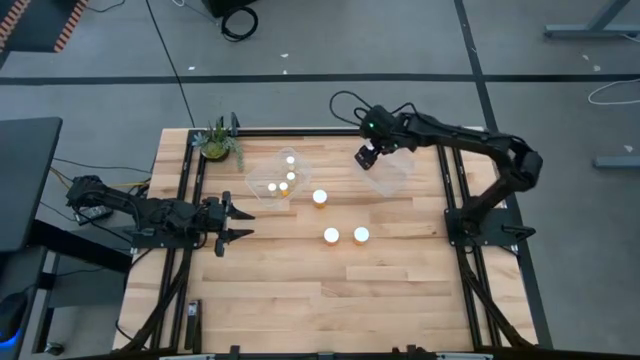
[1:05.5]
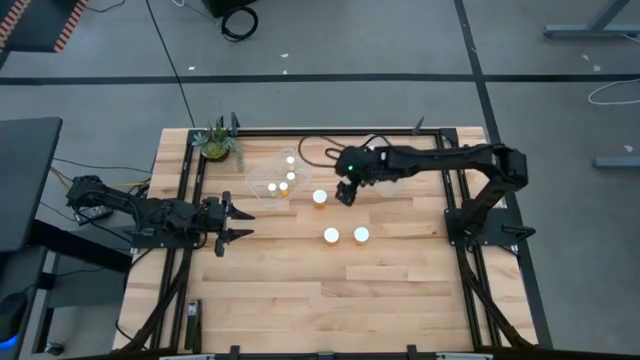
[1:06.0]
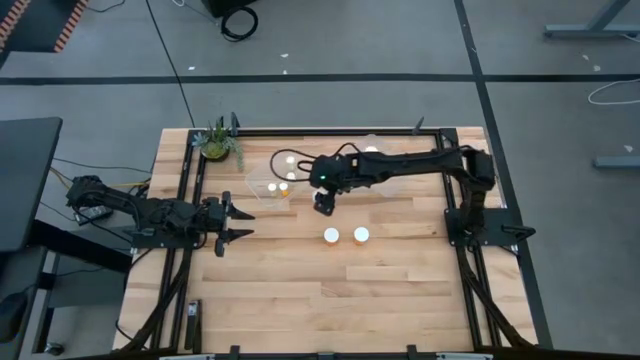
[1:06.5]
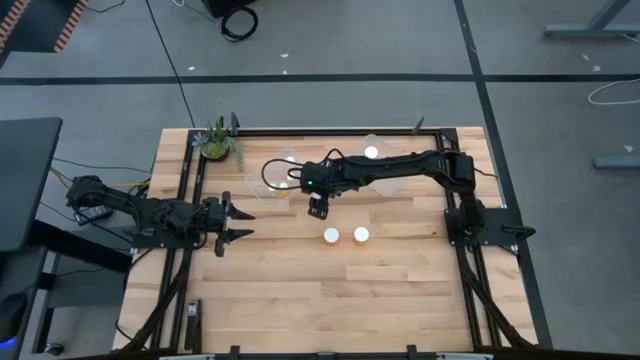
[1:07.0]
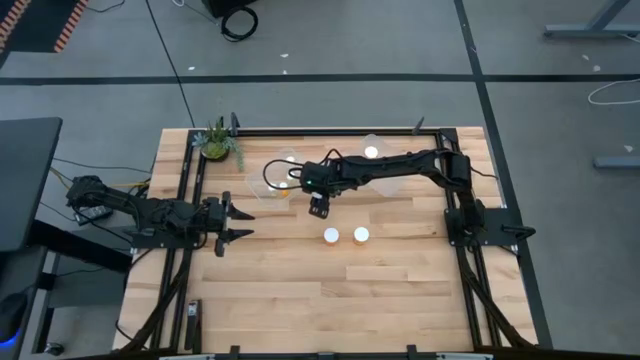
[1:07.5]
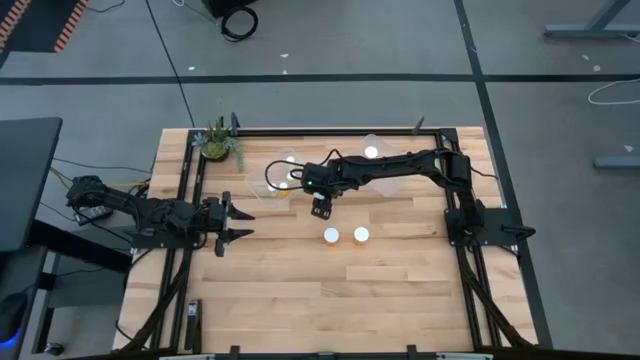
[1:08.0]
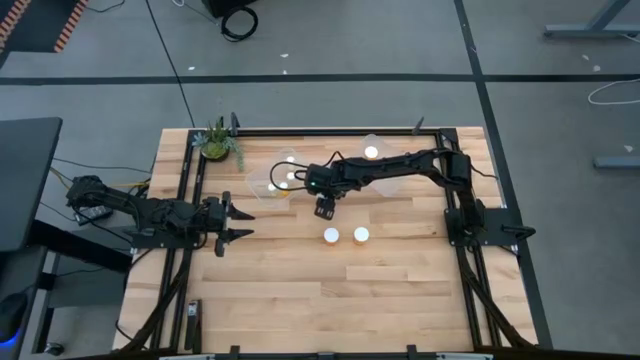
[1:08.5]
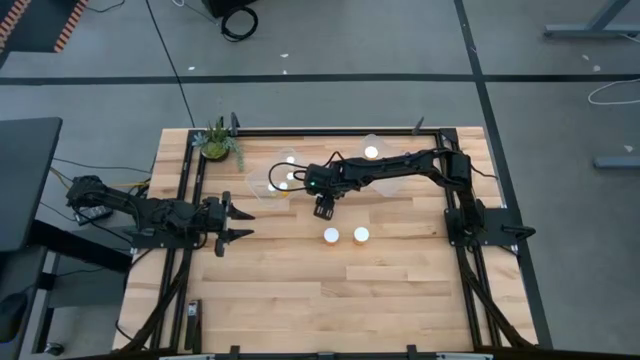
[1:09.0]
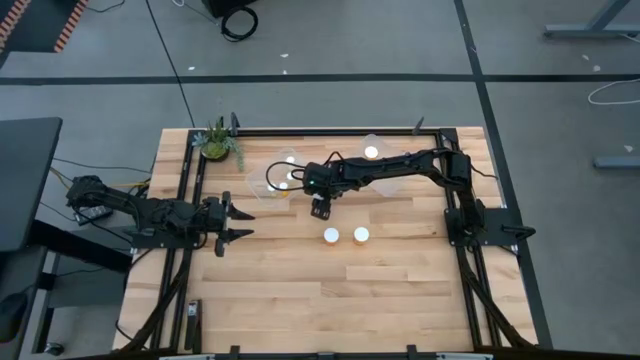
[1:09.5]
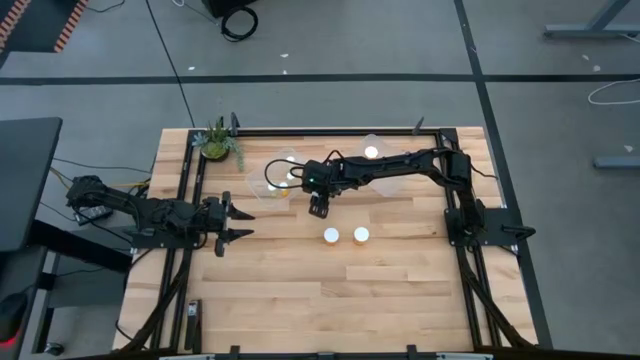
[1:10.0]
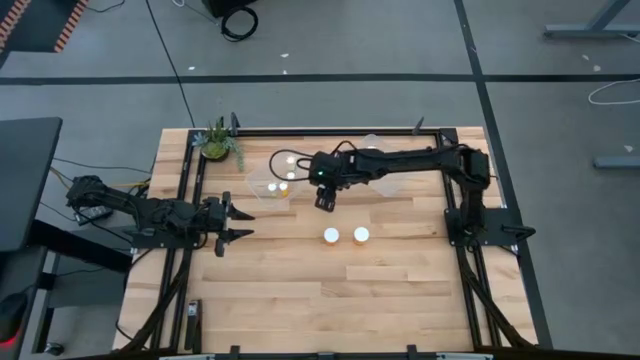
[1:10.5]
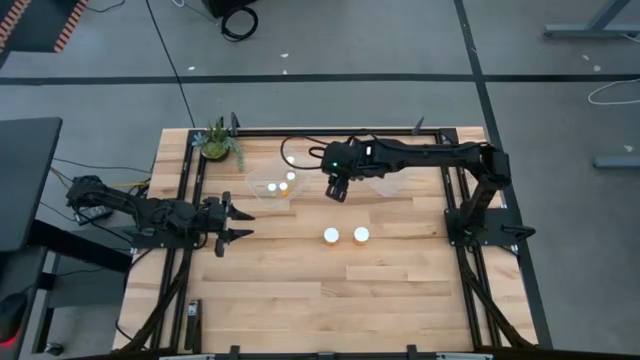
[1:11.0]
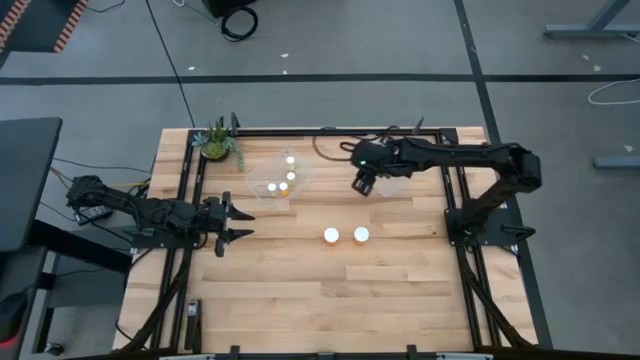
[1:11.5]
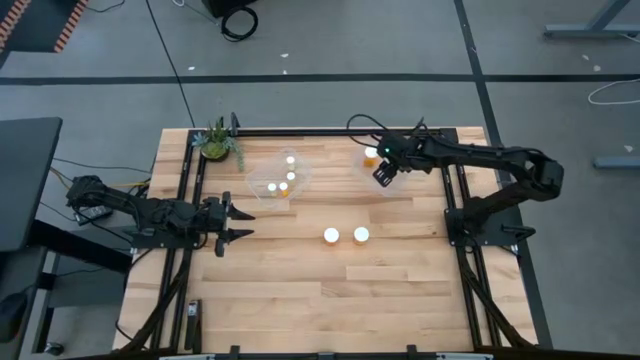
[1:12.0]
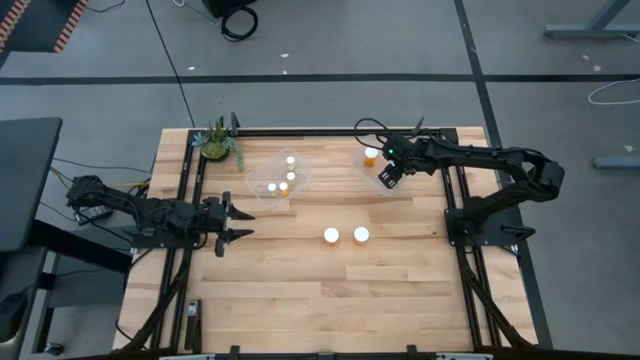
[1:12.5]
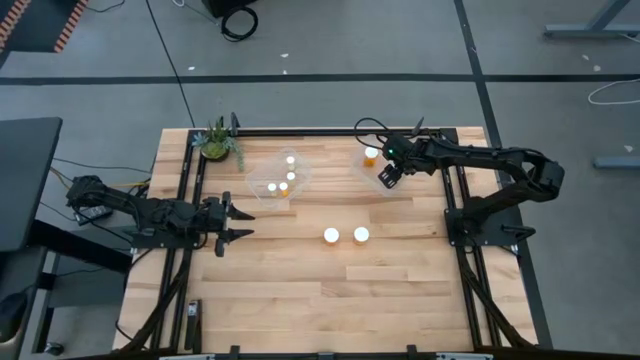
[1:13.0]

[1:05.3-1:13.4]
Task: Pick and place medicine bottles into bin by pill shape (circle, oval)
Put the top big orange pill bottle into the right transparent bin

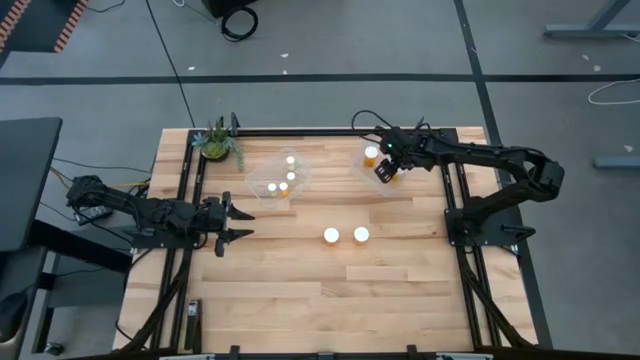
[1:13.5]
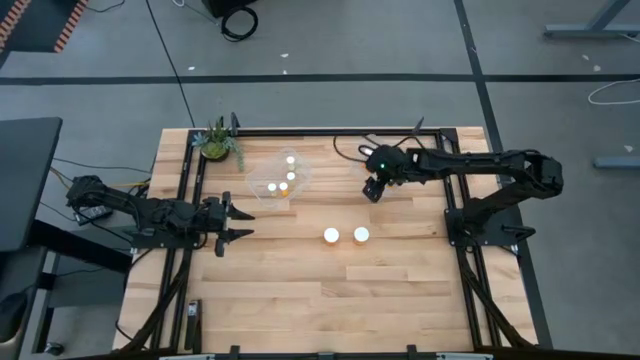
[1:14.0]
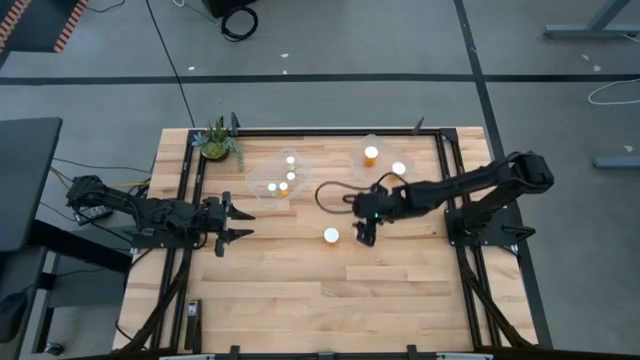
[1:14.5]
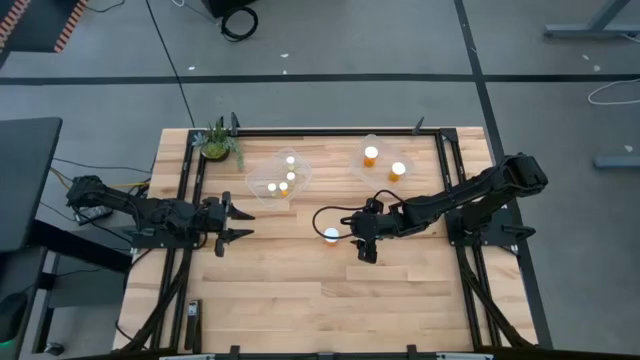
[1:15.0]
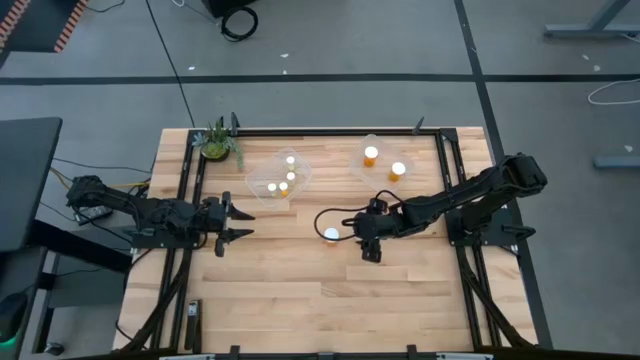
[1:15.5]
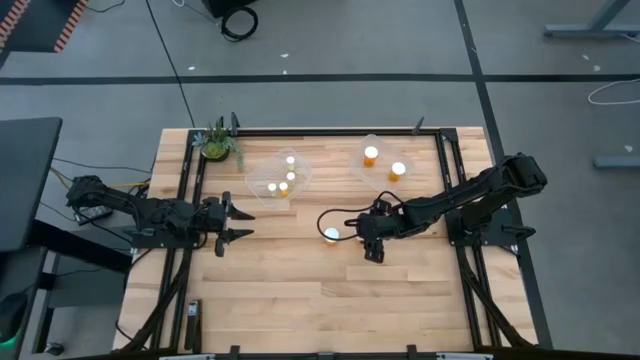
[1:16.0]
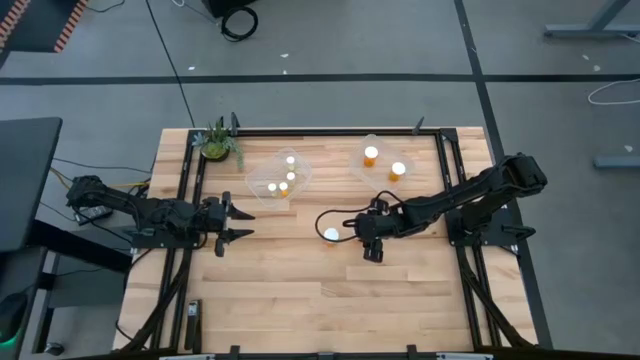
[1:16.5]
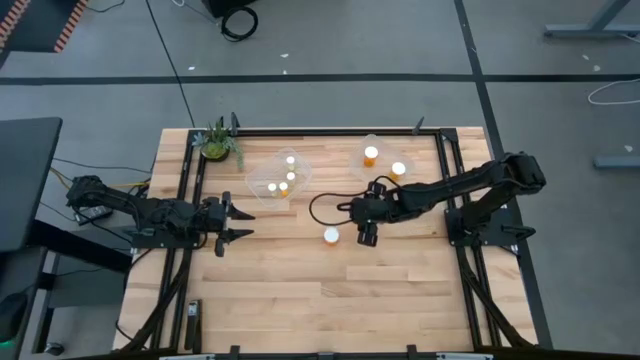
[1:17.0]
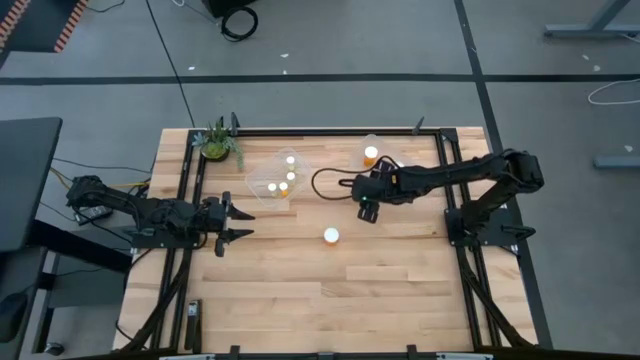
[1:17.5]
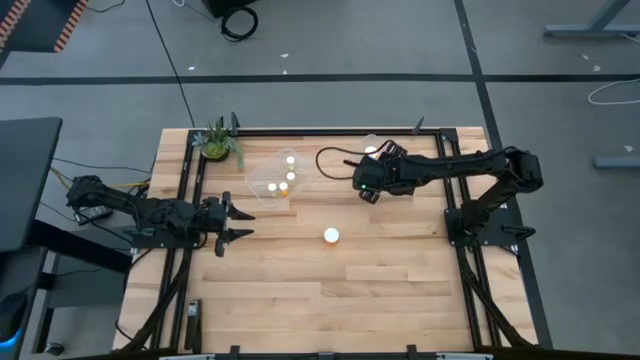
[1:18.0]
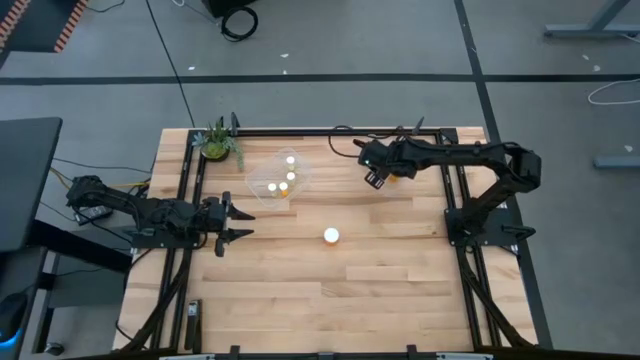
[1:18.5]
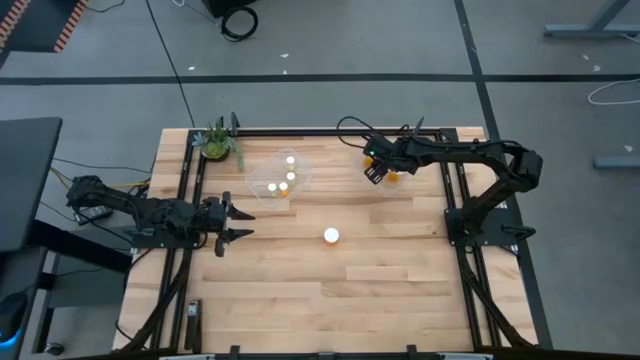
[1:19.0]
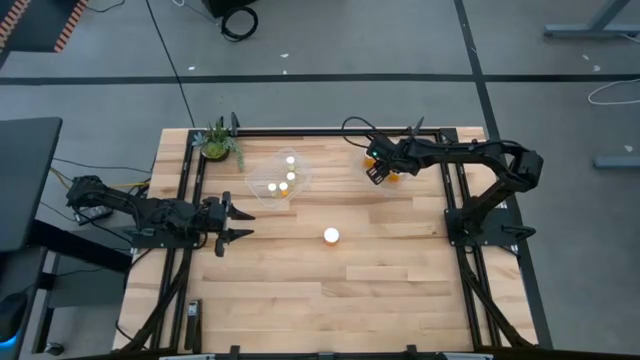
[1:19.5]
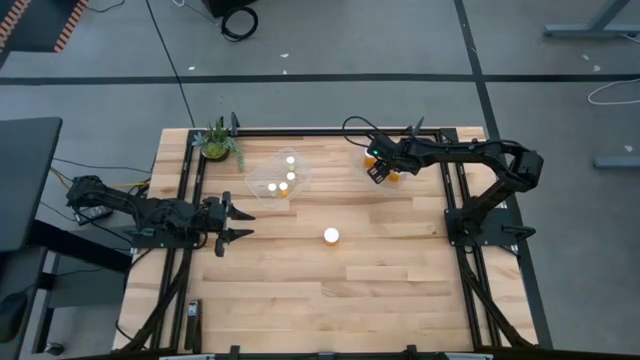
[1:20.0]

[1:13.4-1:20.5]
Put the right big orange pill bottle into the right transparent bin

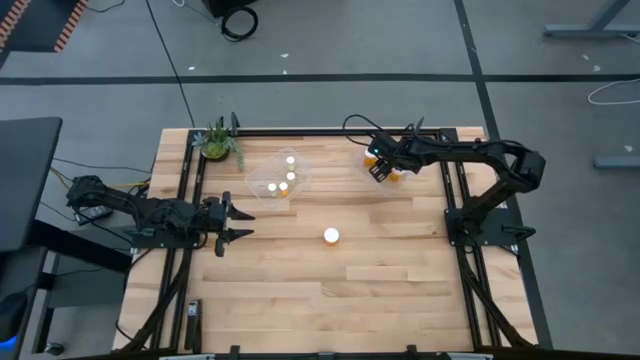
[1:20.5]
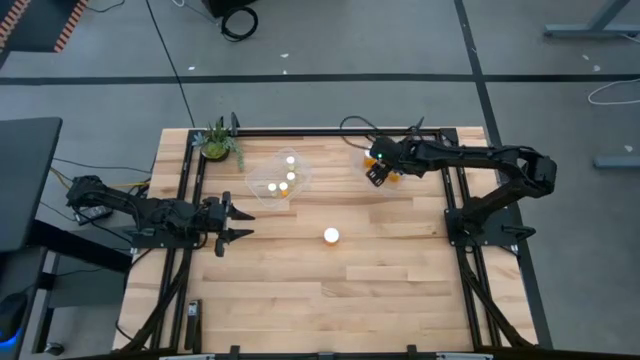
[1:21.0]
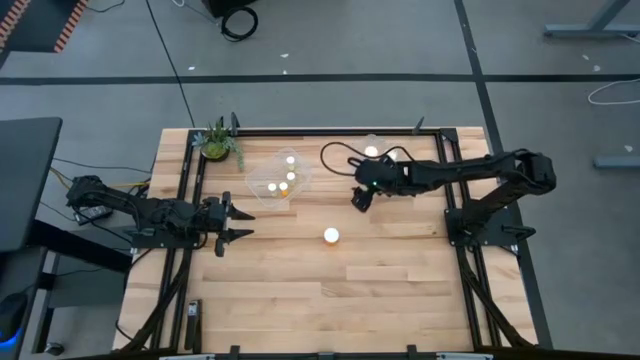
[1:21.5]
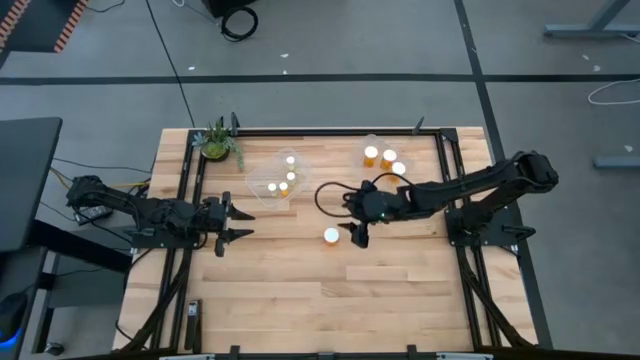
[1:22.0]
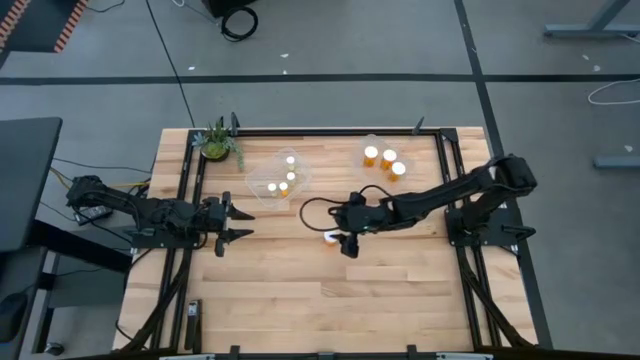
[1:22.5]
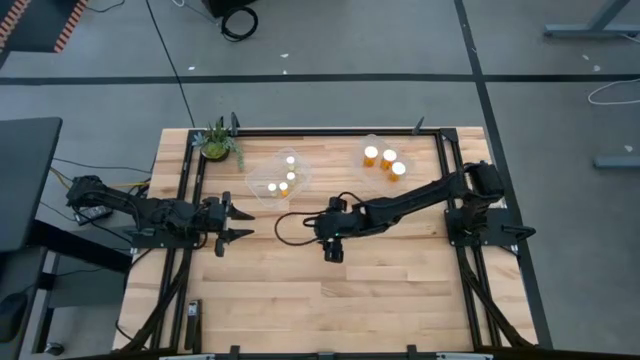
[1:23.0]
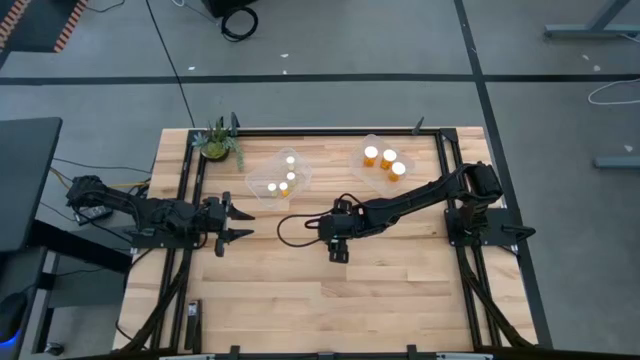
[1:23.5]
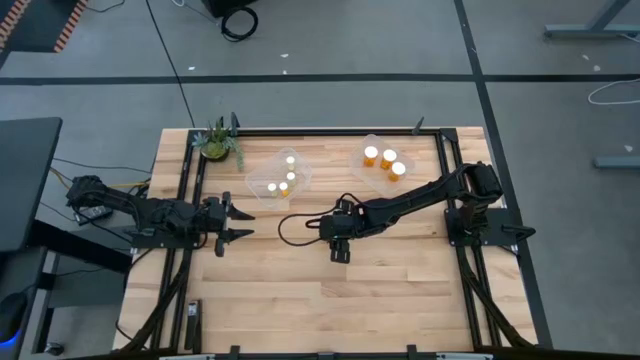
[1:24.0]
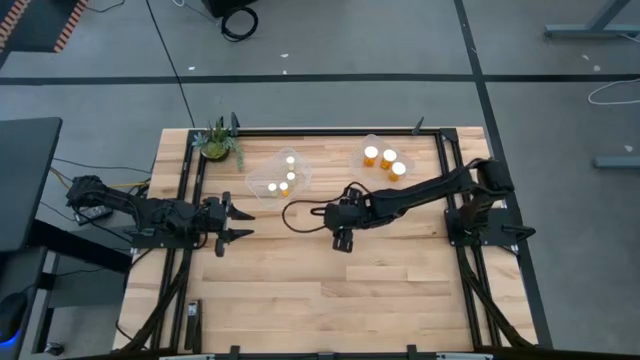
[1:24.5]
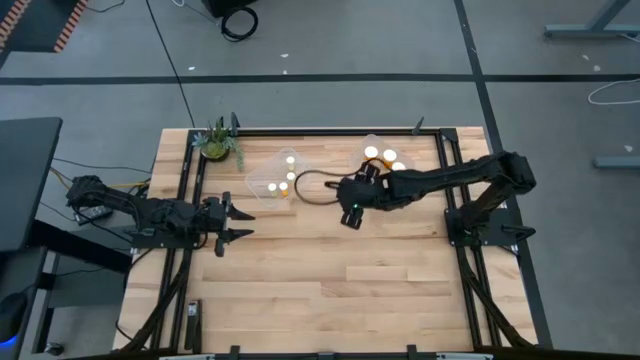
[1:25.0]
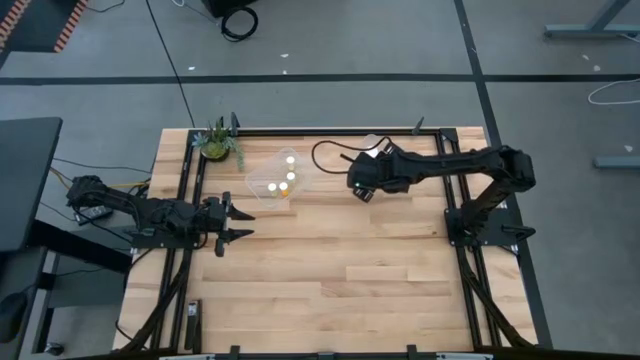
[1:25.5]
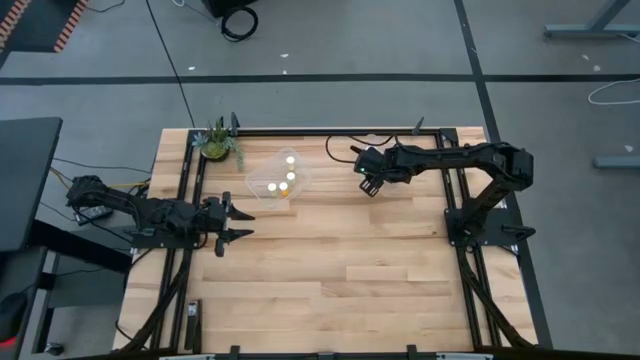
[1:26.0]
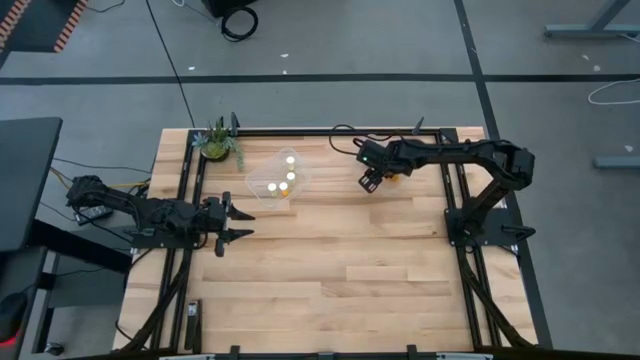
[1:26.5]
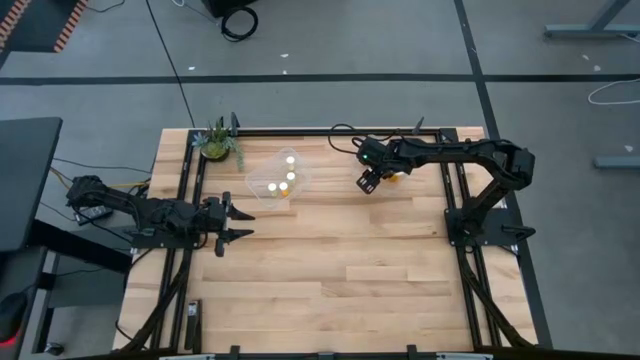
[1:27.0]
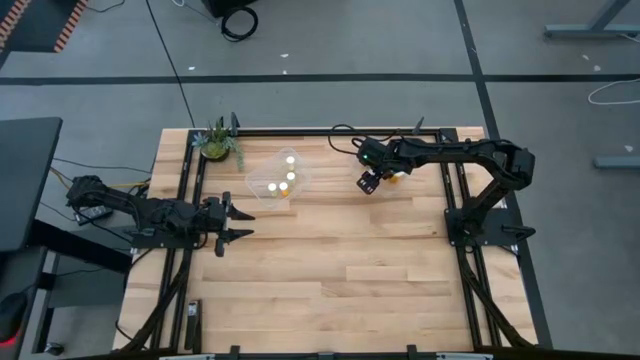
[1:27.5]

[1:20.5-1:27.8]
Put the big orange pill bottle into the right transparent bin
